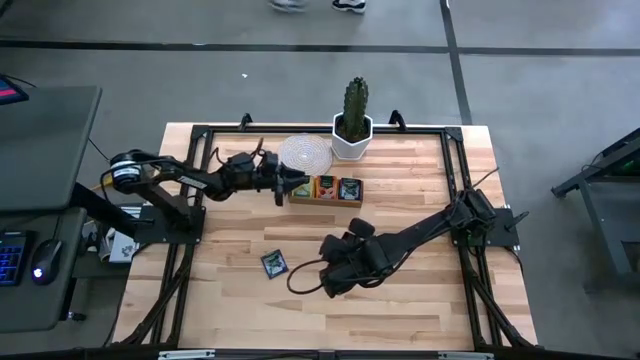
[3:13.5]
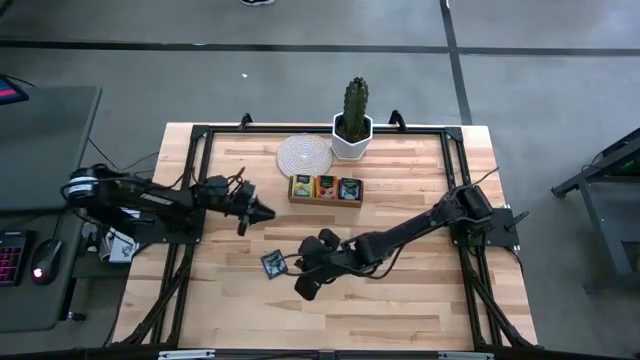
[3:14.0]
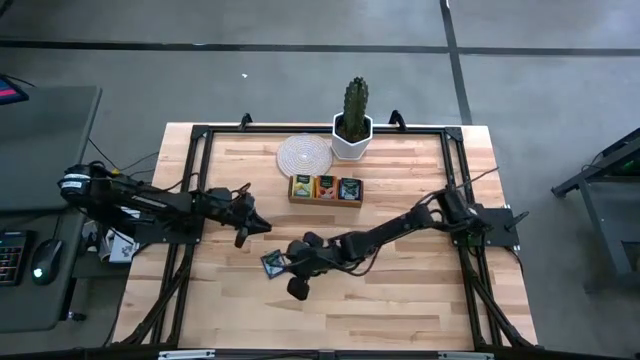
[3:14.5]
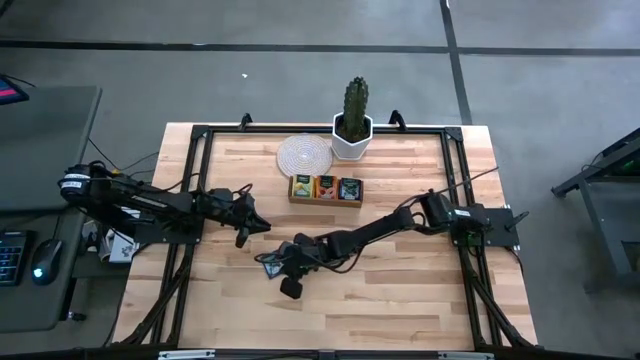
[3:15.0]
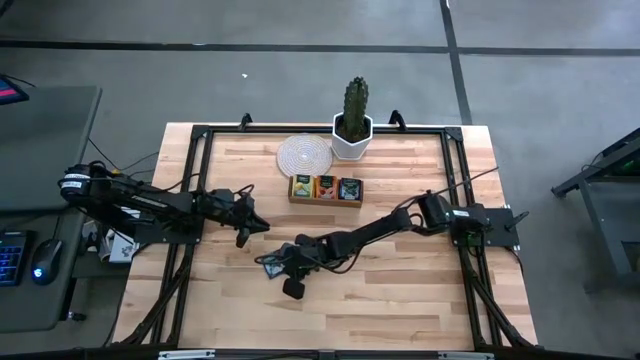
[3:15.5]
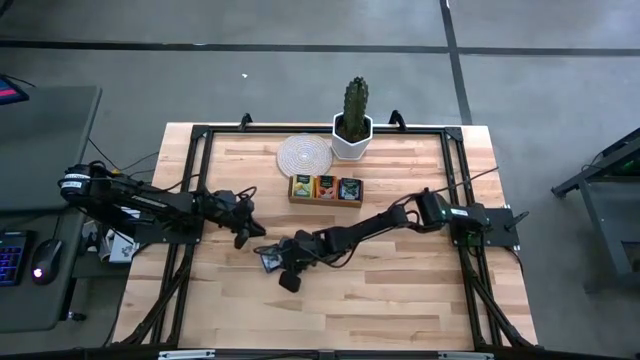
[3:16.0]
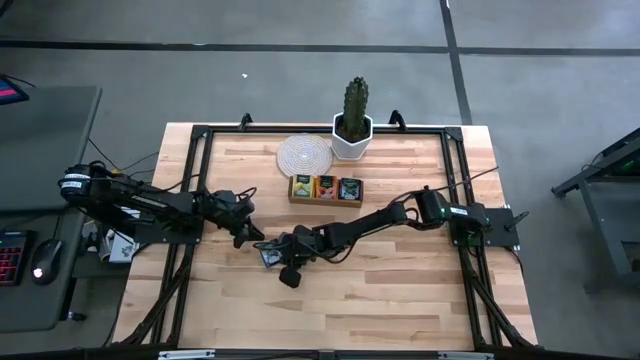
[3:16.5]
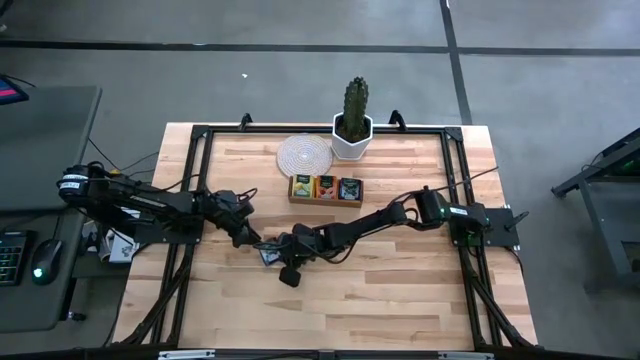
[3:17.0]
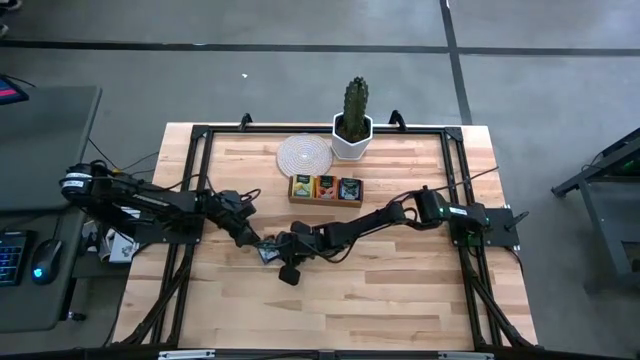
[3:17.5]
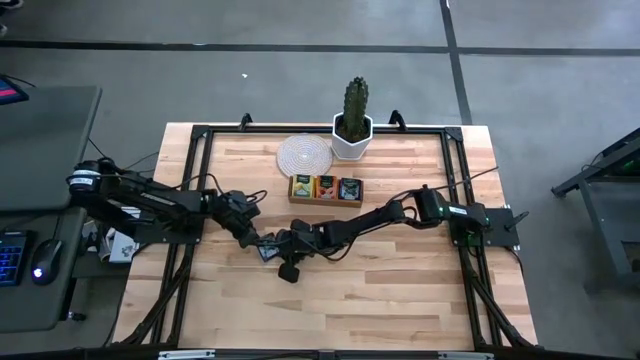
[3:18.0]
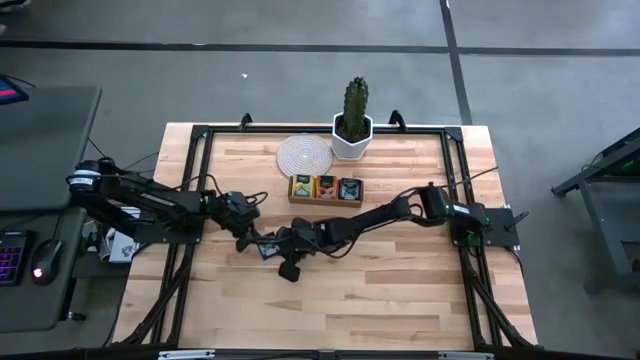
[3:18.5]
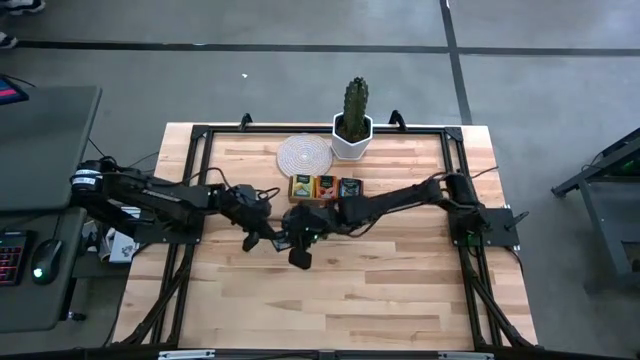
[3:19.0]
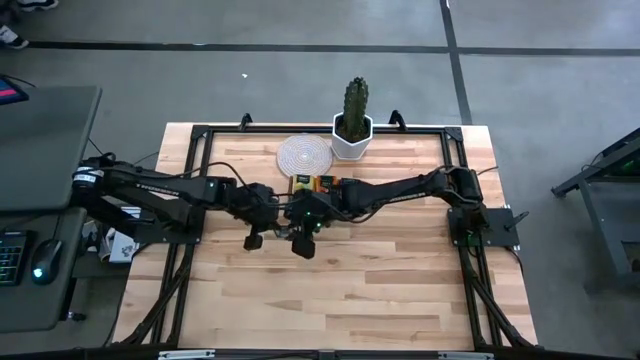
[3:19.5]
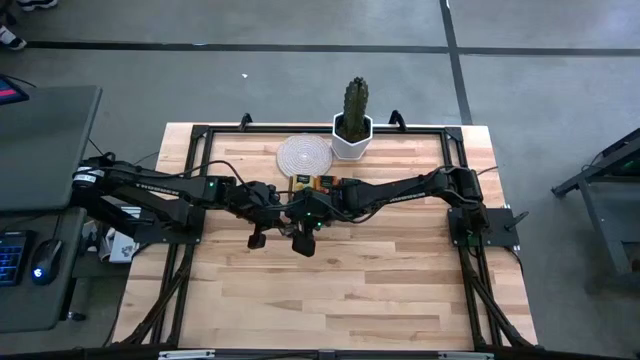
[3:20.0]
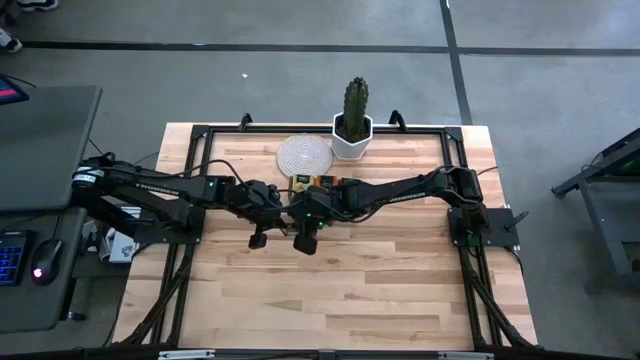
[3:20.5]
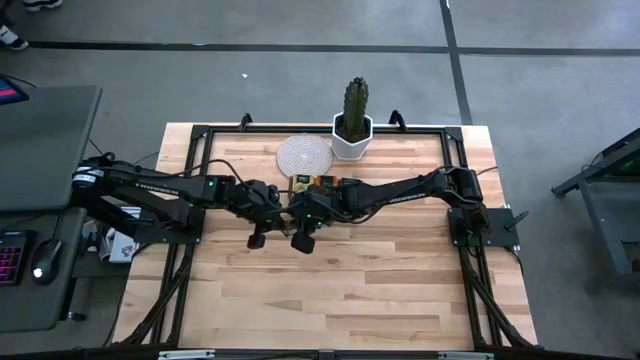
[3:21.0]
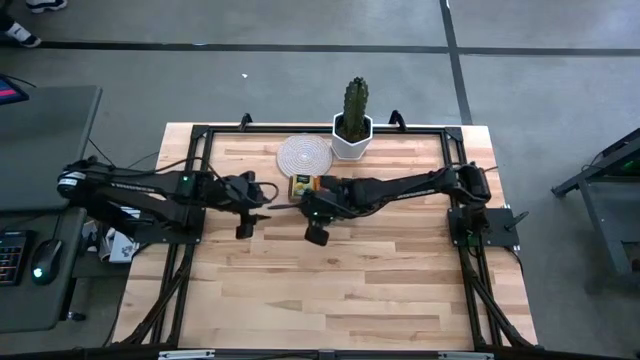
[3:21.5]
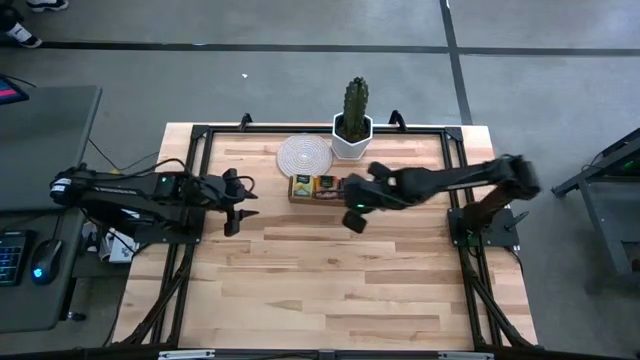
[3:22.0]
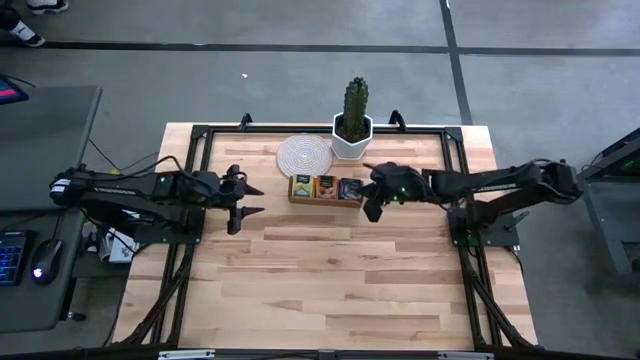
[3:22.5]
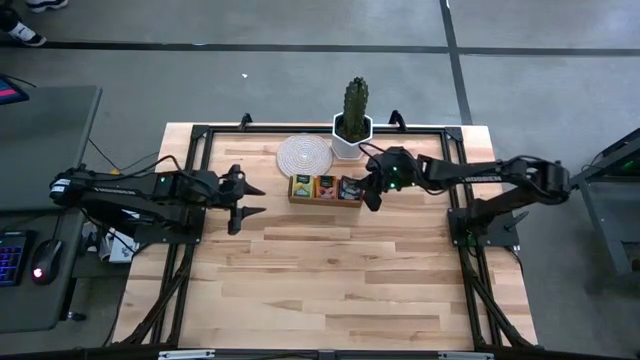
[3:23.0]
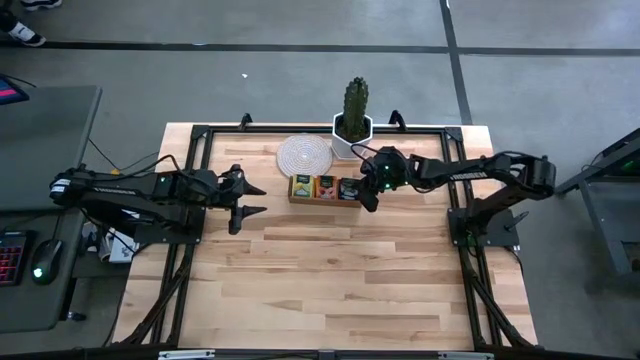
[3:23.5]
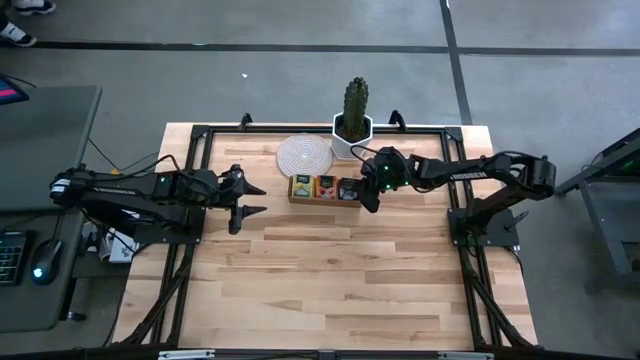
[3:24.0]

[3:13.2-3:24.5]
Task: Pick & Place Tea
Put the purple tea bag into the right section of the wooden organizer

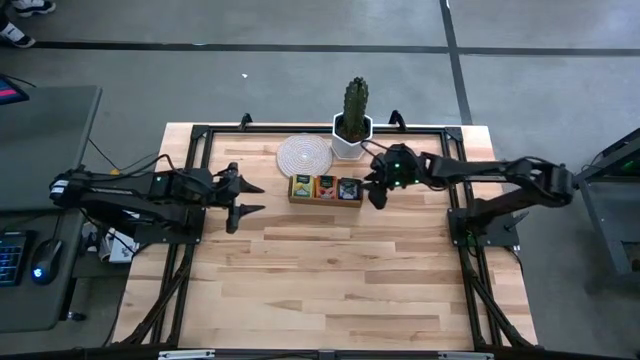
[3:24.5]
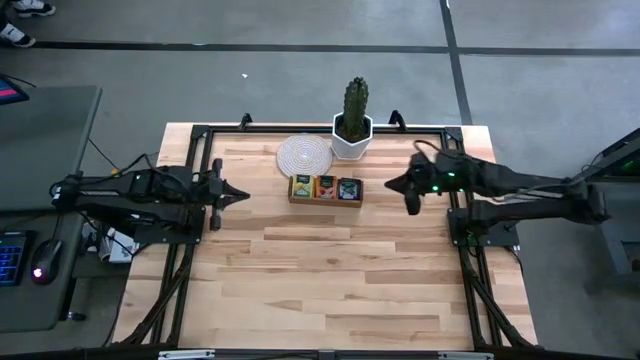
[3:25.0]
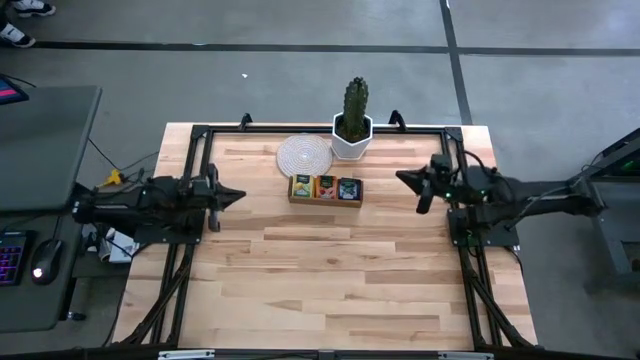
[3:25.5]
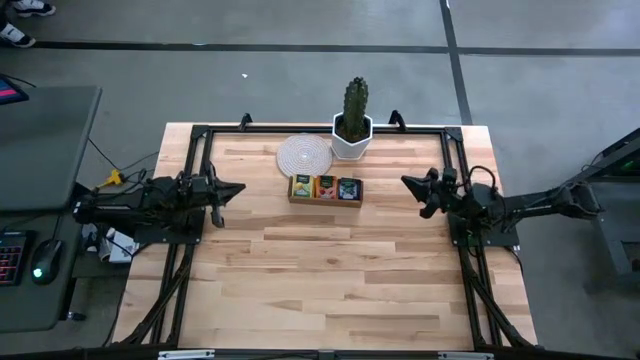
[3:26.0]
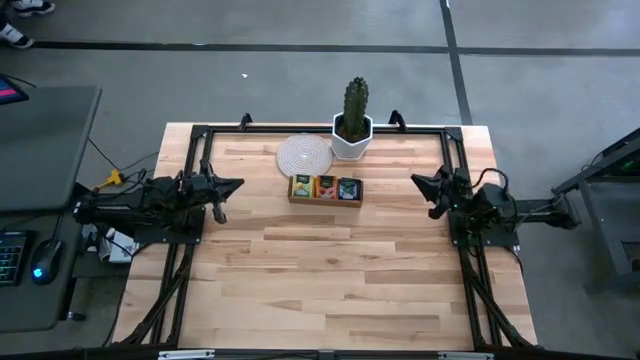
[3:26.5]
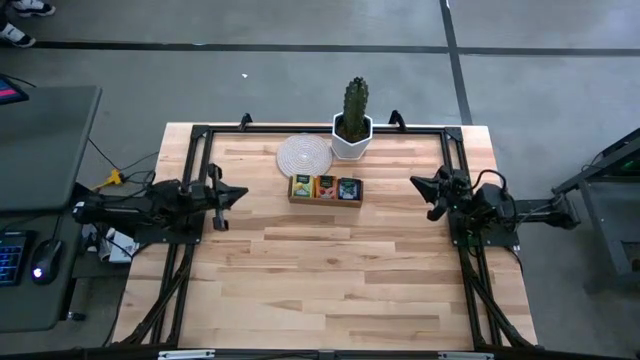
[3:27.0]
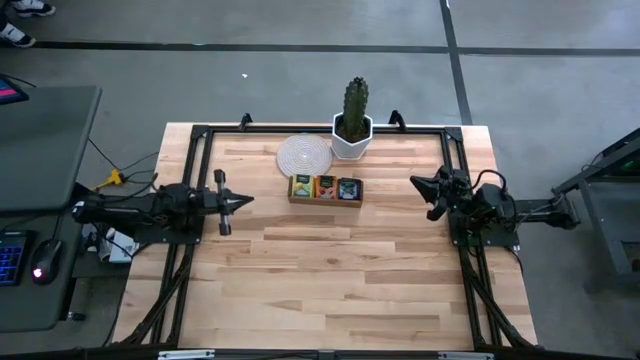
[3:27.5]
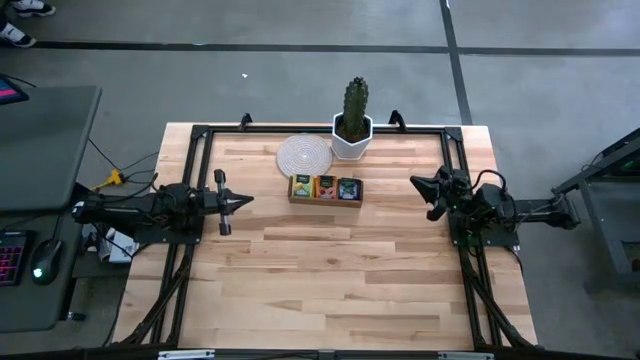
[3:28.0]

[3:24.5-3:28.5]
Return to Home Position

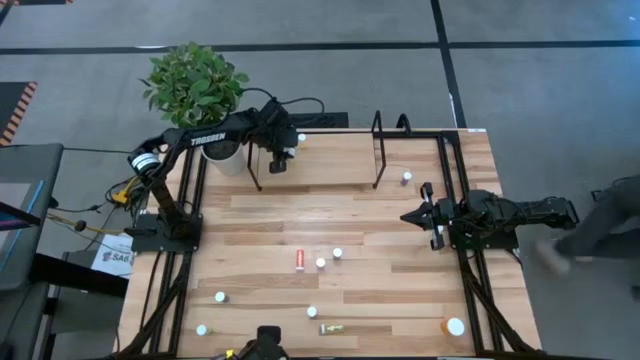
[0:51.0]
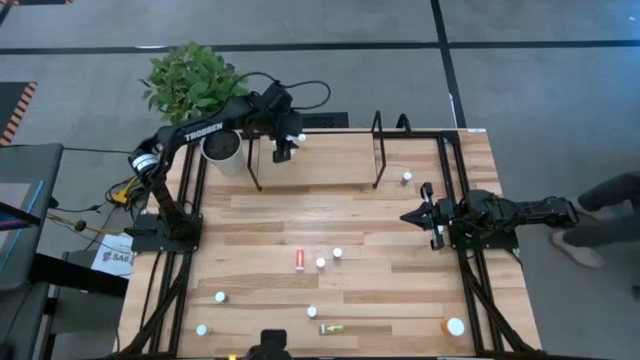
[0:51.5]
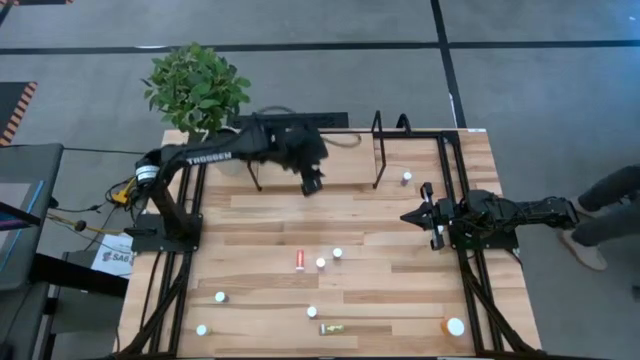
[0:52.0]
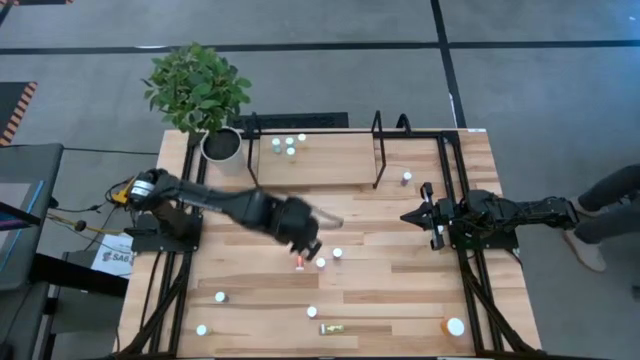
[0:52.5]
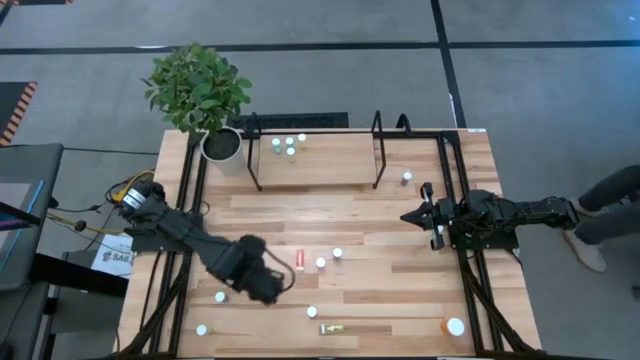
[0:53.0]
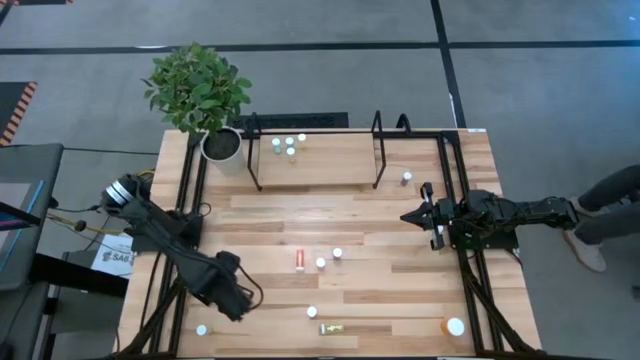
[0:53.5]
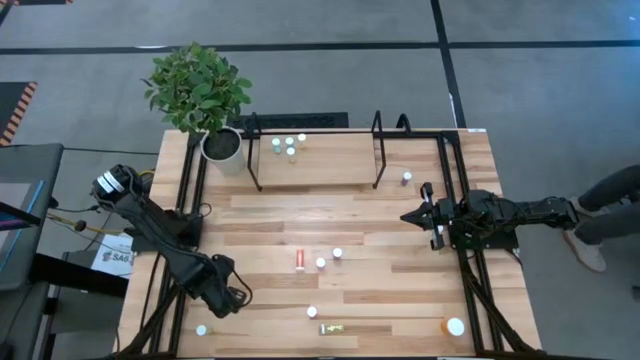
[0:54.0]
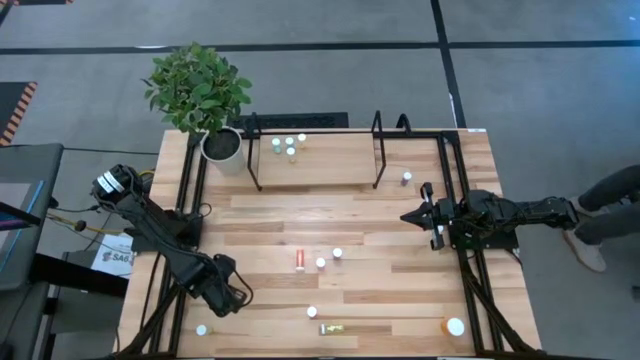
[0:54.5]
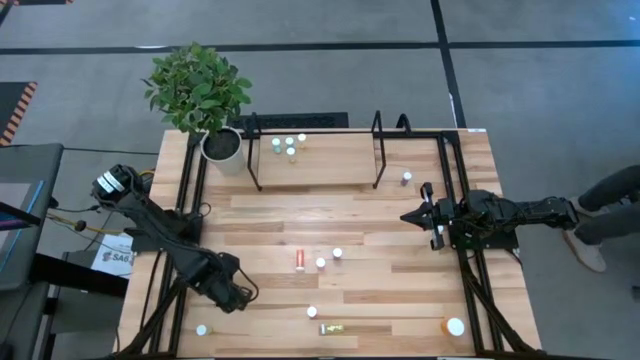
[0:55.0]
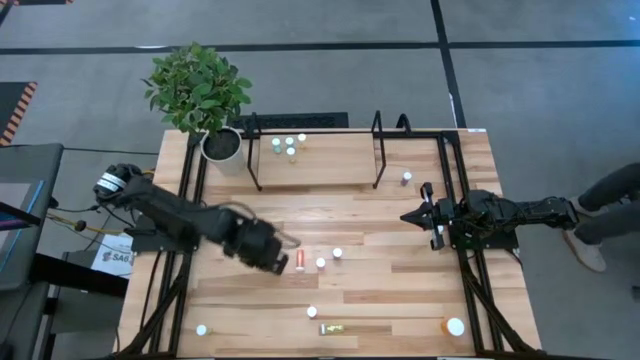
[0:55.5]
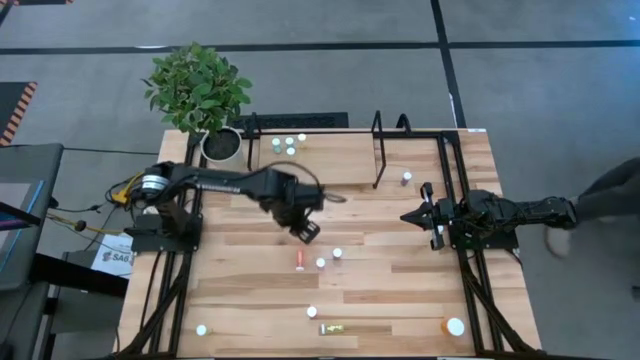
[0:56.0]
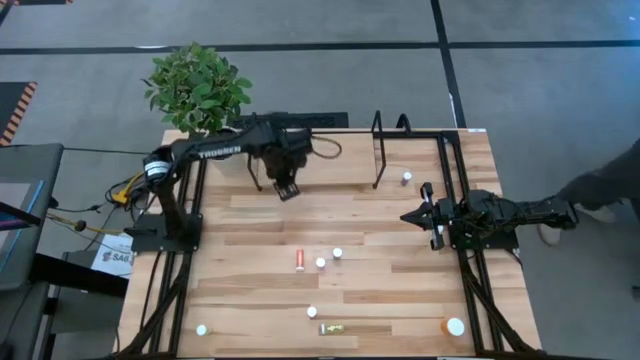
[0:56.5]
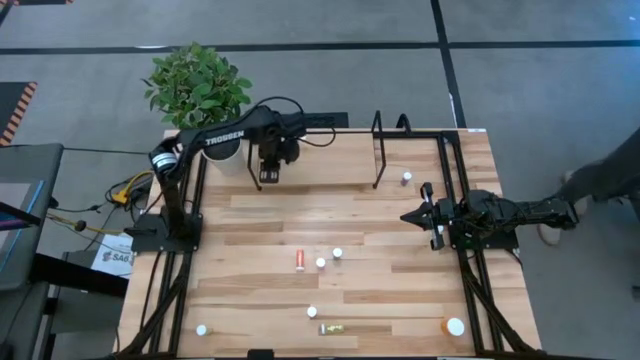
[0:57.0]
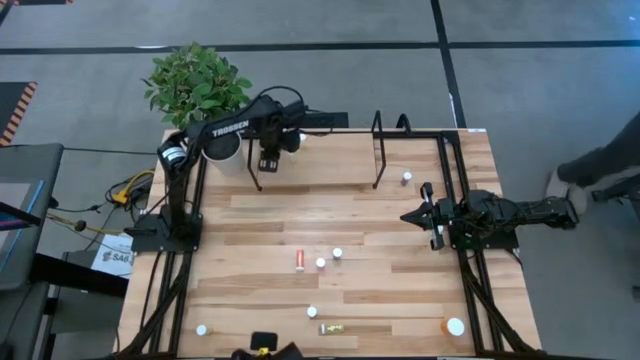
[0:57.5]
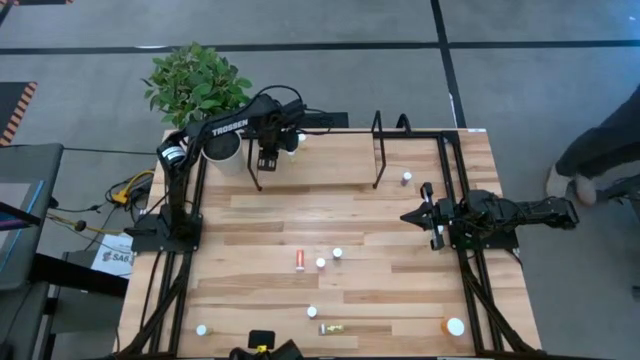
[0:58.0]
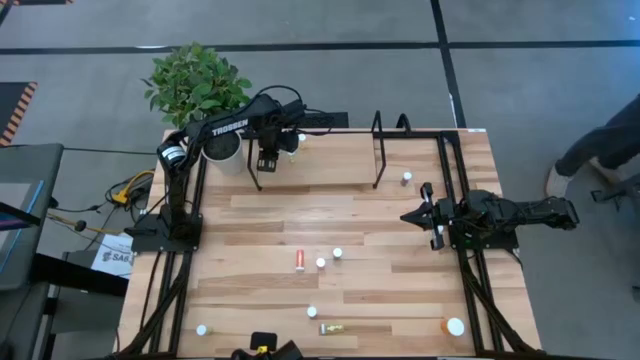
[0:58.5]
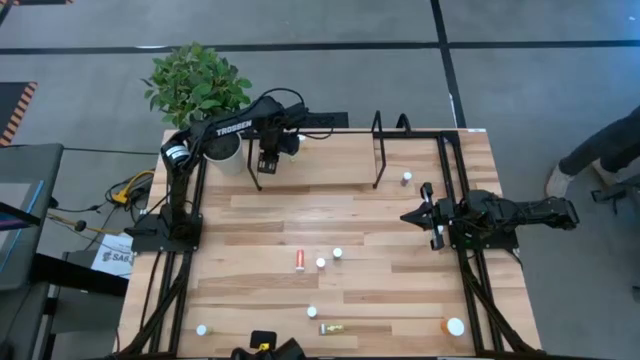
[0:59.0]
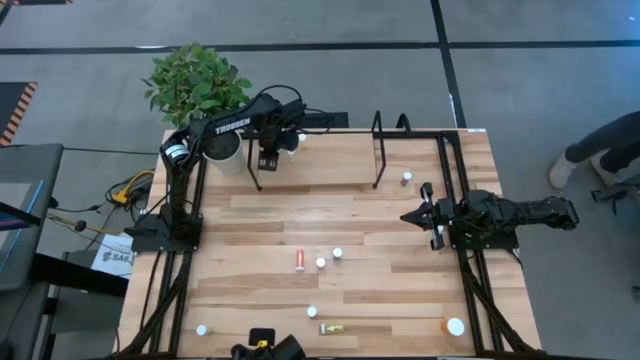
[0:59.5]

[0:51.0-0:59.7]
Task: Pick and place medicine bottles onto shelf by color
Put the blue pill bottle on the shelf
